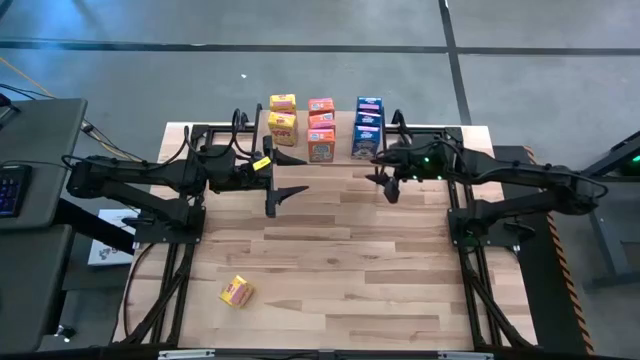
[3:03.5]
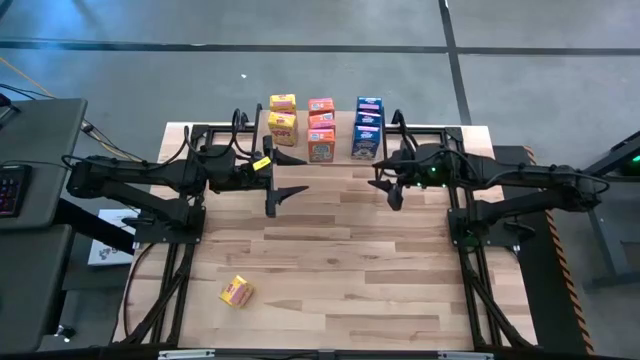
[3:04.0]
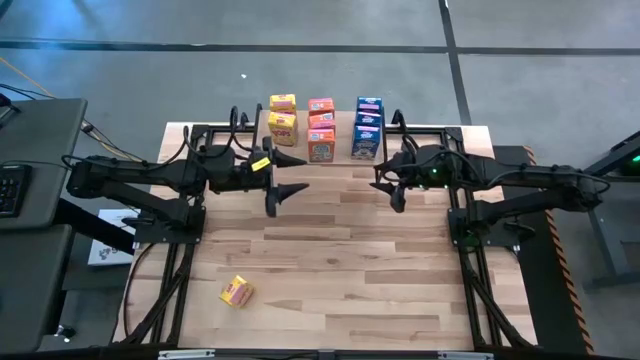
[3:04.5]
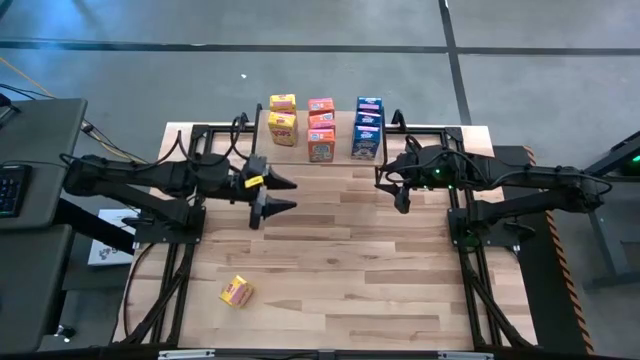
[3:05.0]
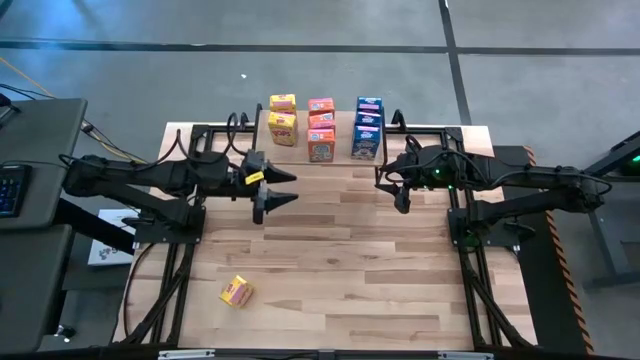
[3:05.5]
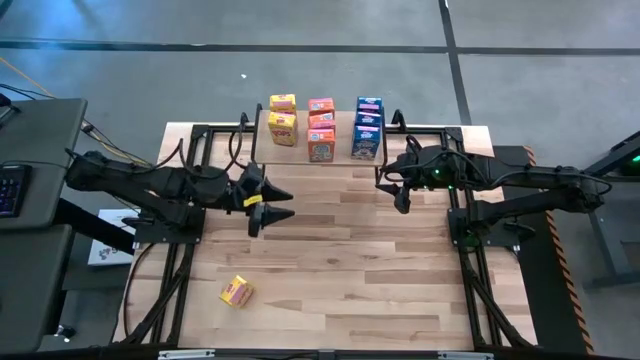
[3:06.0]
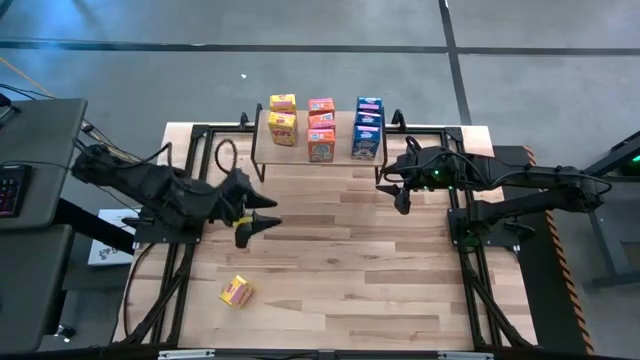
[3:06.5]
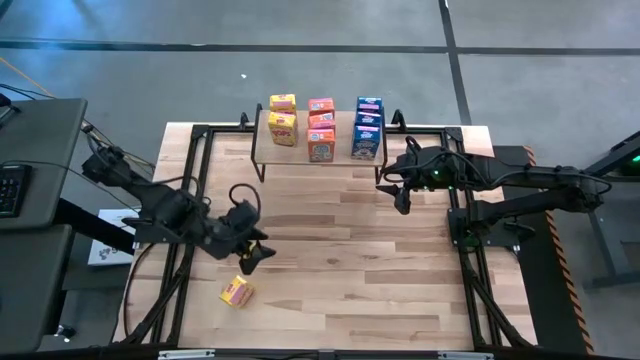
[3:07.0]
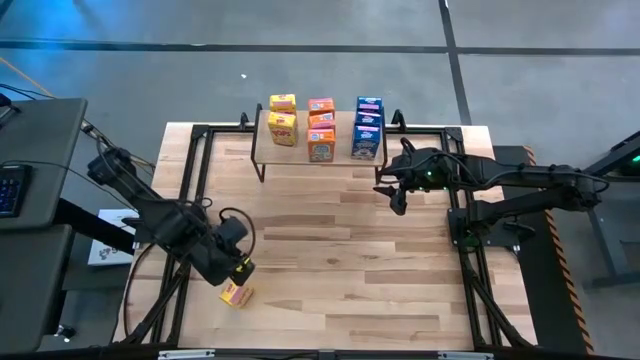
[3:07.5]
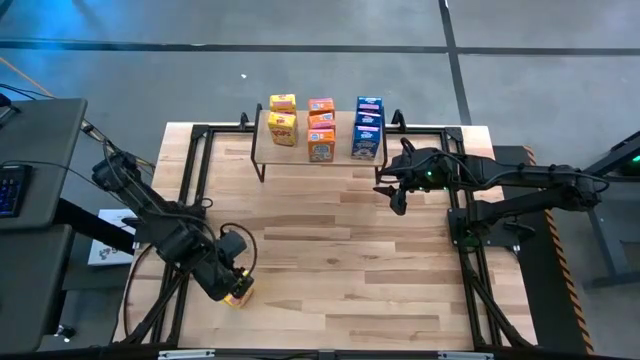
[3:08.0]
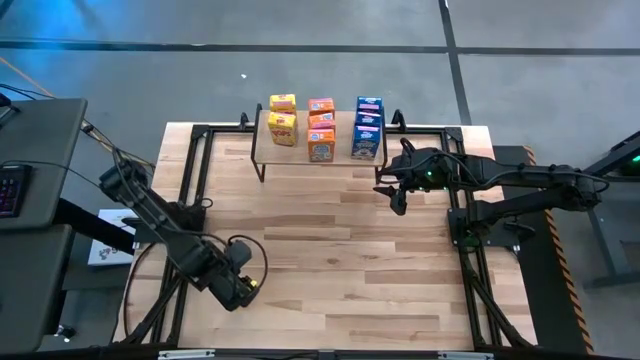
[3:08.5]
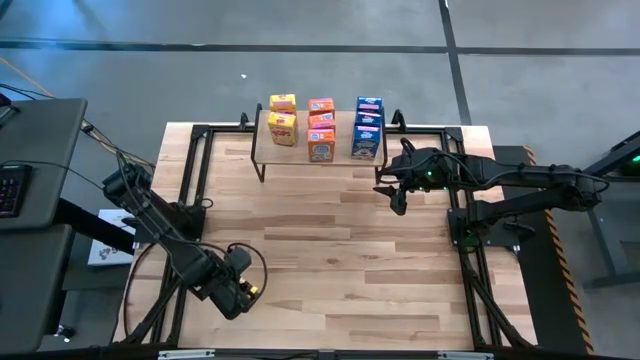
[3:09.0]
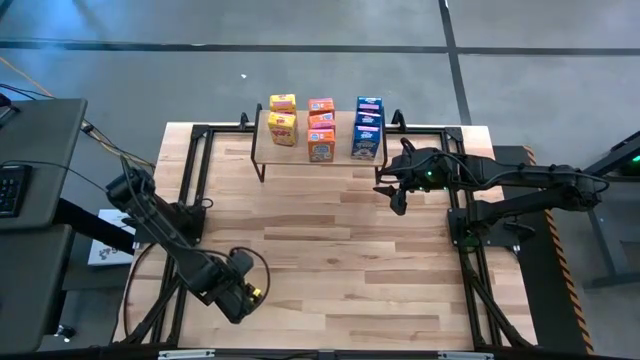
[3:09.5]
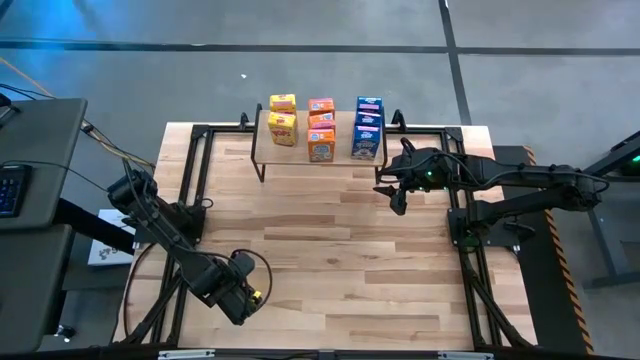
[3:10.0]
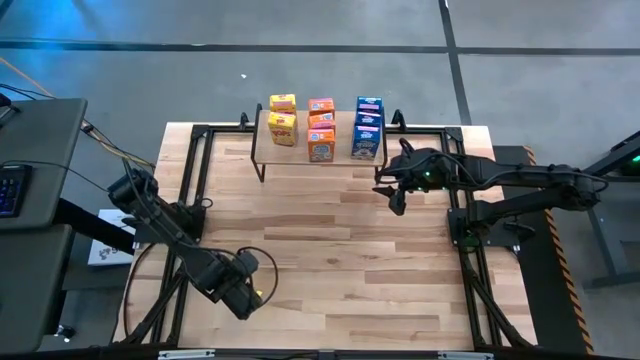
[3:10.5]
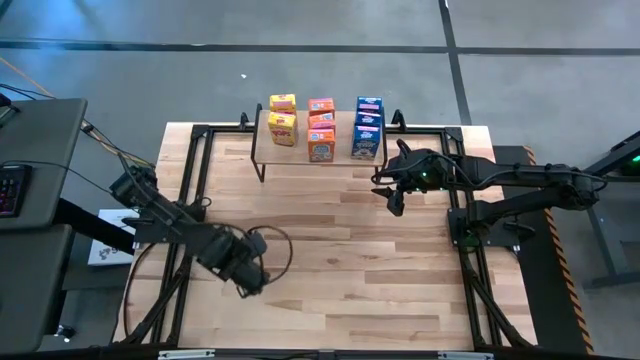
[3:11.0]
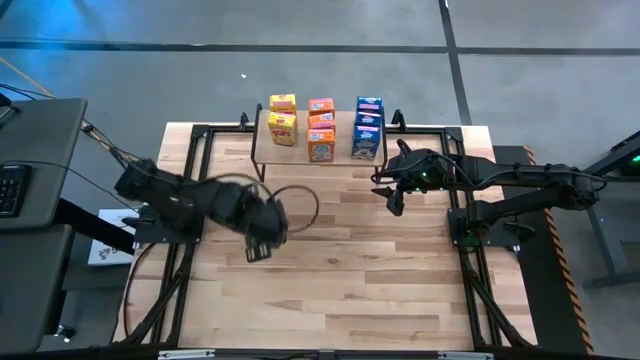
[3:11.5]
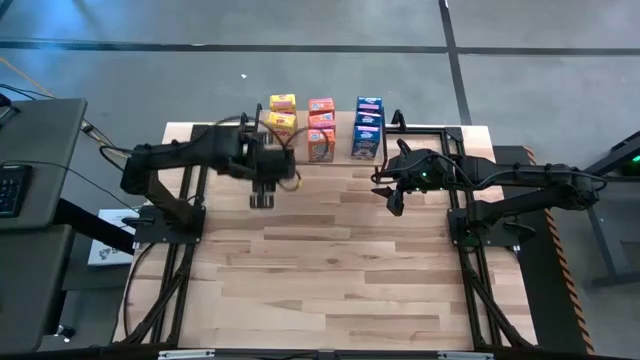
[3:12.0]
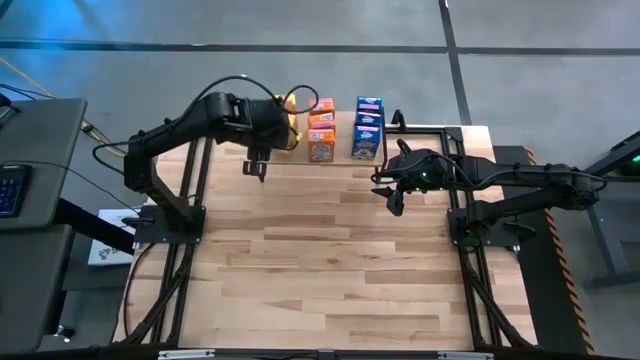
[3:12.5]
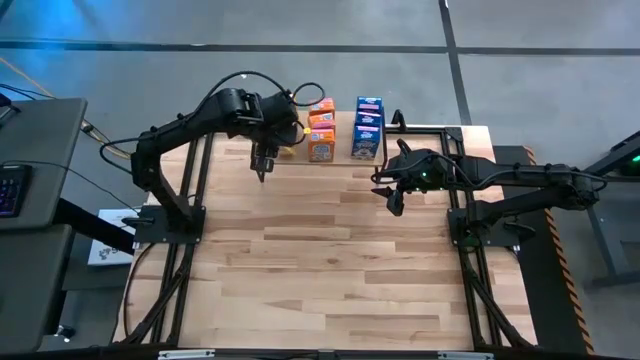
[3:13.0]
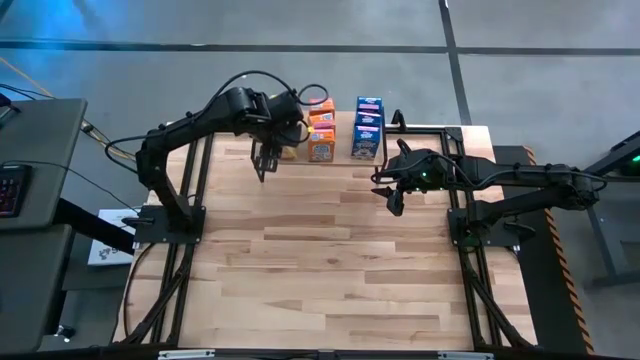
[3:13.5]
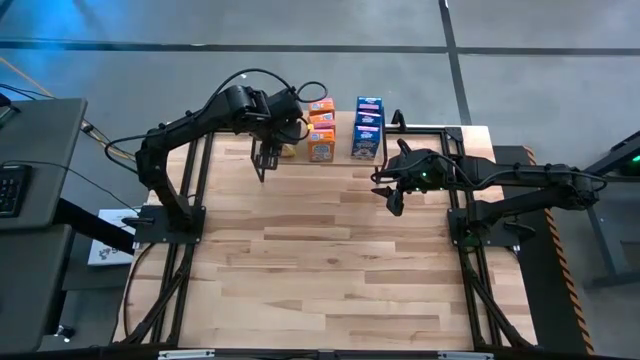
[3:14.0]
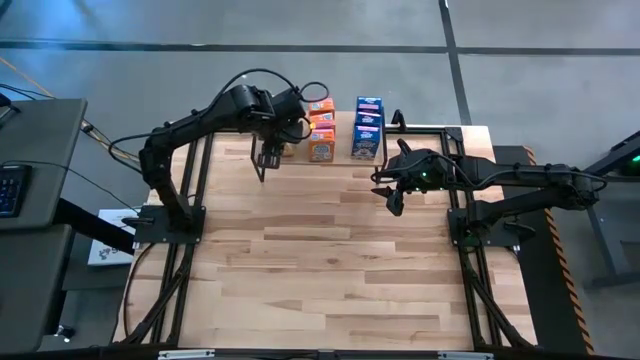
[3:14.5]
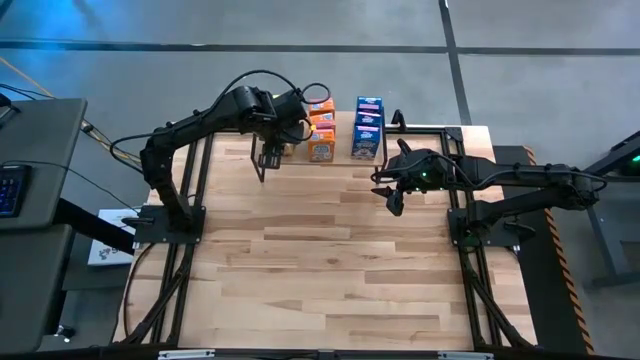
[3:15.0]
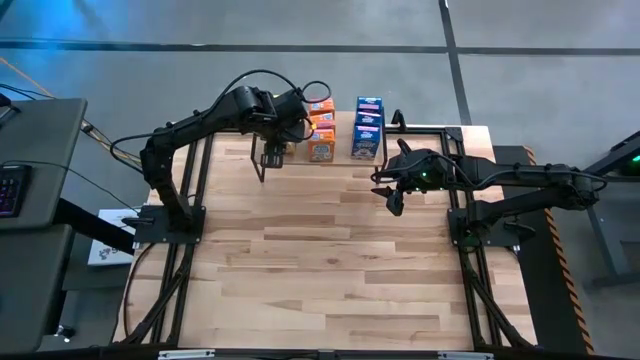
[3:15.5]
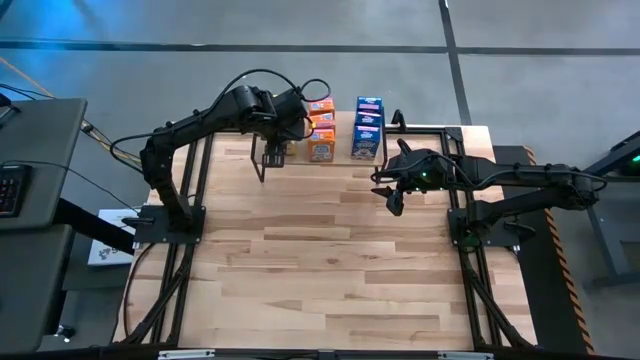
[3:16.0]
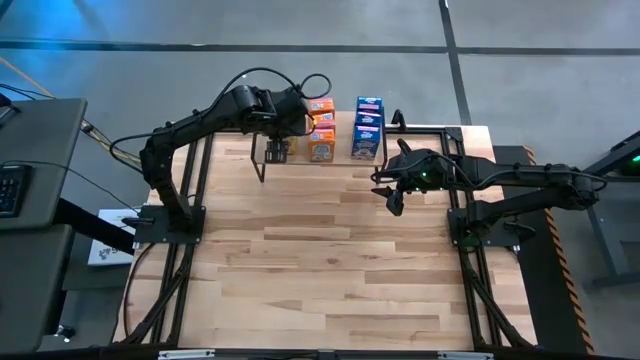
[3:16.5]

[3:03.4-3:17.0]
Task: Stack cereal on shelf
Put the yellow cereal box on the shelf aligned with the other yellow cereal boxes

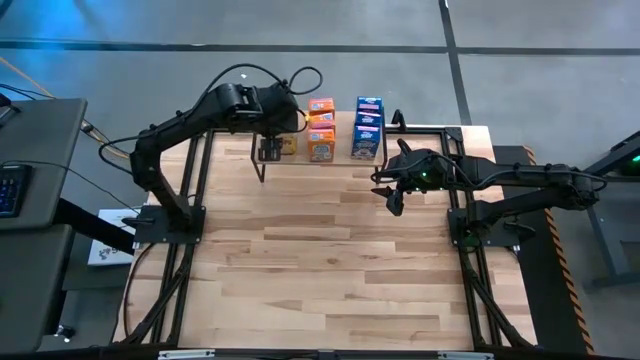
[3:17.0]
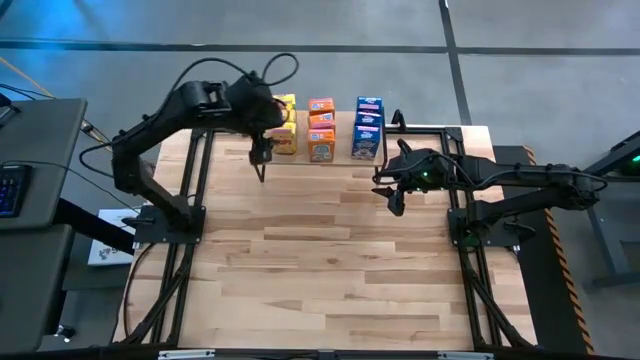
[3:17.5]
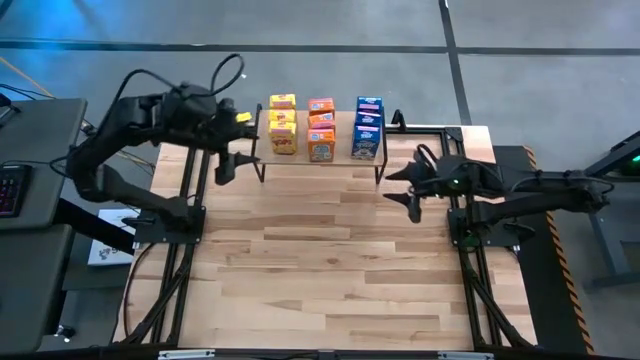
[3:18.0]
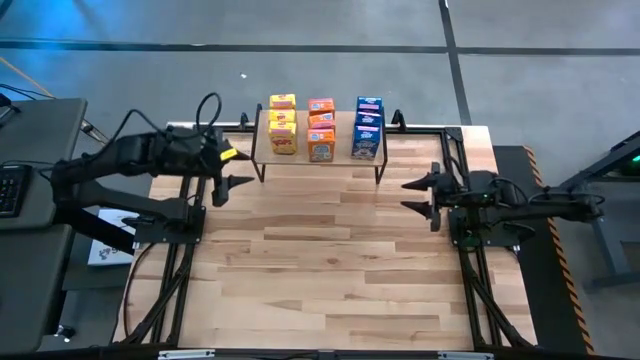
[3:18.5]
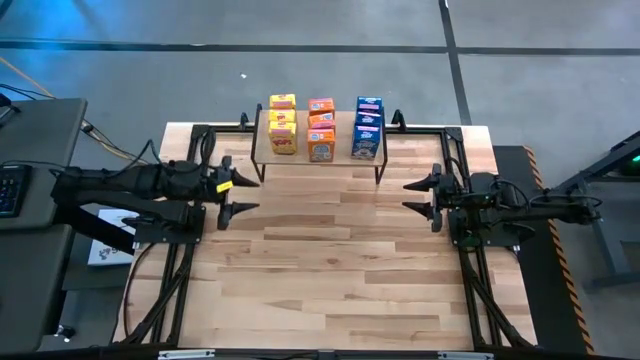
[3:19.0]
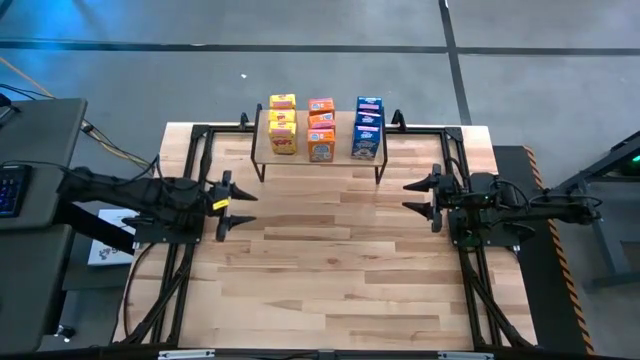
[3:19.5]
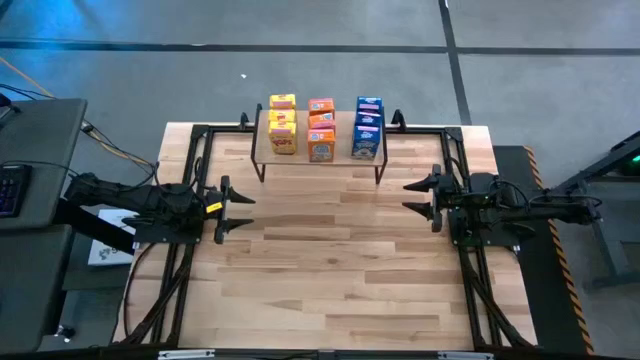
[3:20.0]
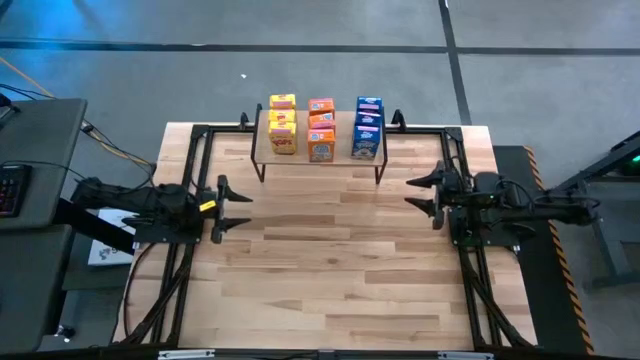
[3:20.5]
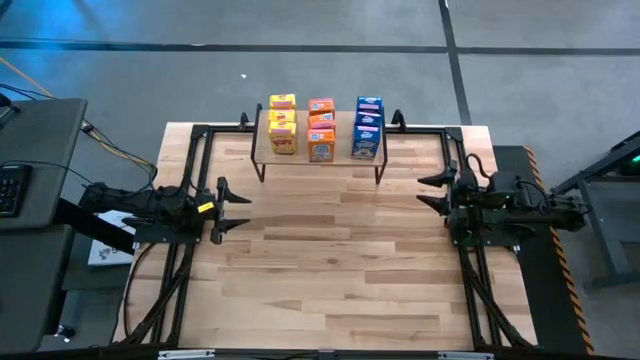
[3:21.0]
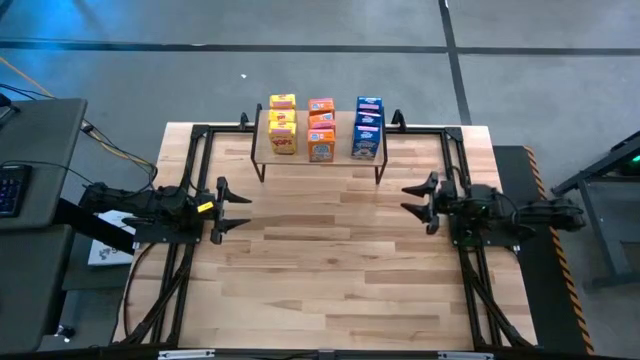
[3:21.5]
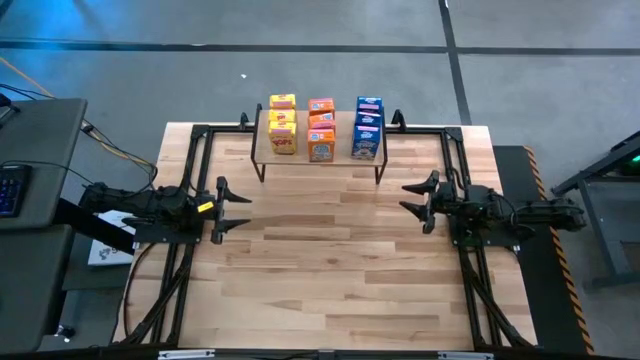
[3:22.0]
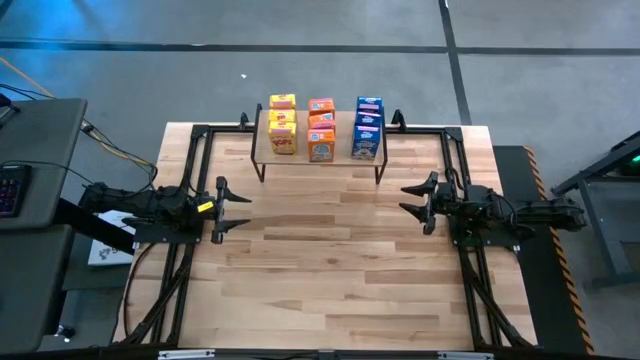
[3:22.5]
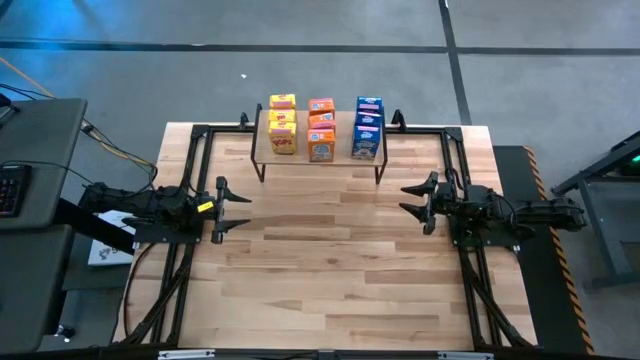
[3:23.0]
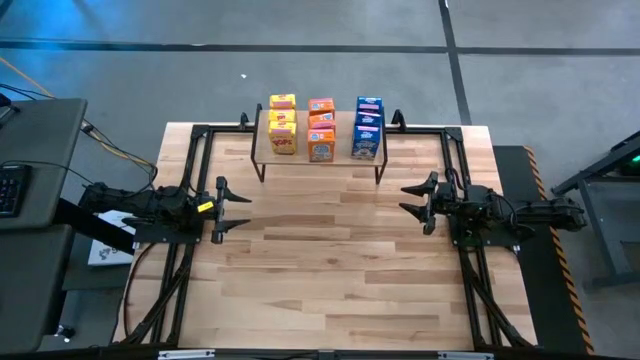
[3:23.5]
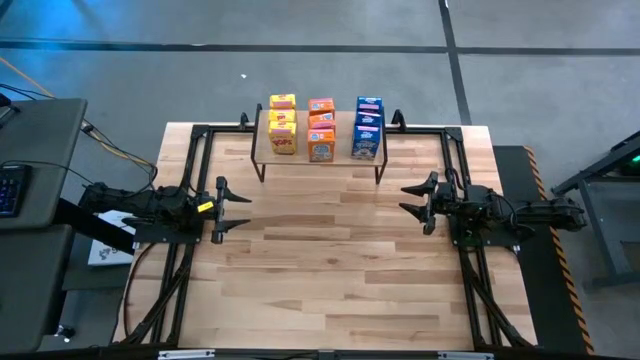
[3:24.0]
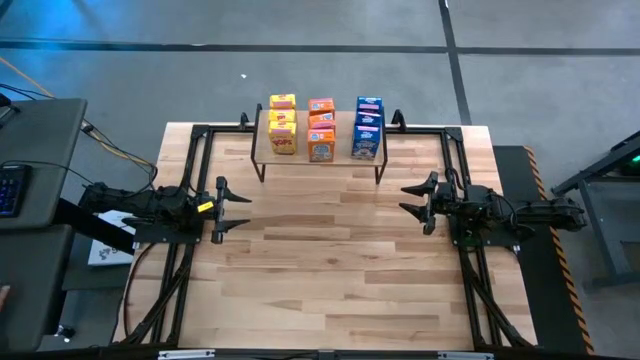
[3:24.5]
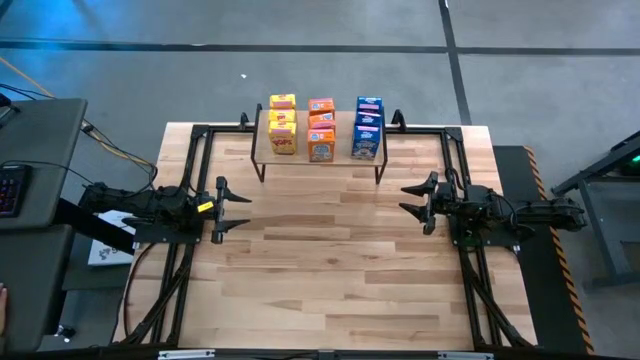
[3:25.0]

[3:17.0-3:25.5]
Return to Home Position
